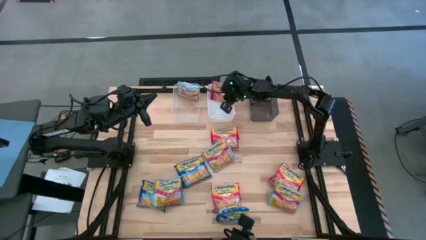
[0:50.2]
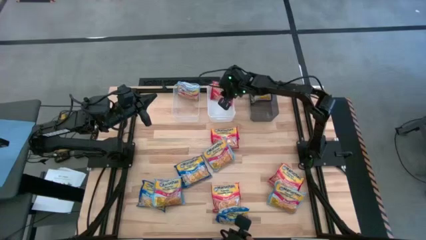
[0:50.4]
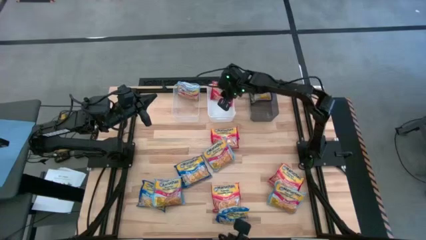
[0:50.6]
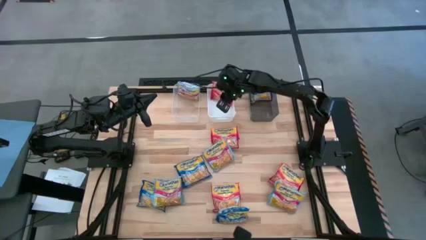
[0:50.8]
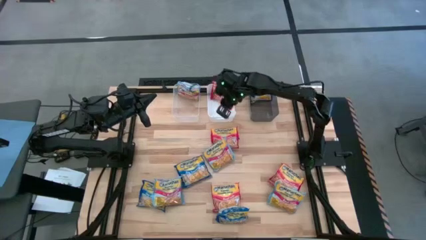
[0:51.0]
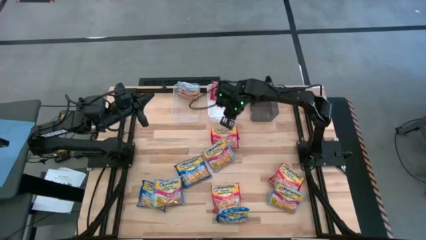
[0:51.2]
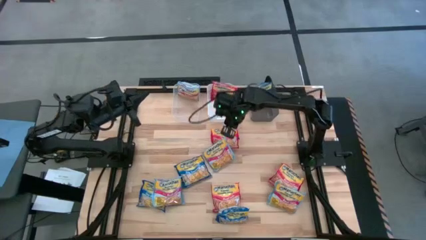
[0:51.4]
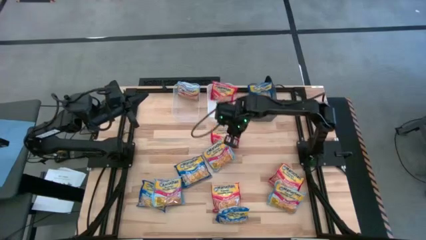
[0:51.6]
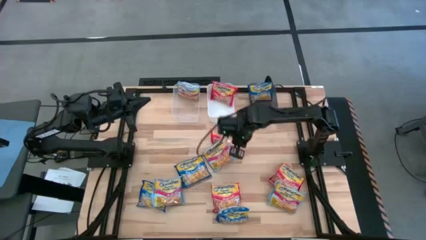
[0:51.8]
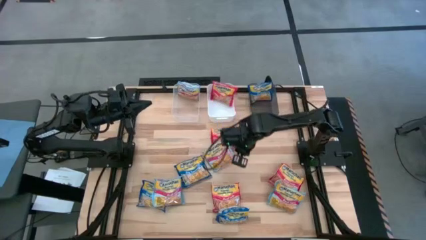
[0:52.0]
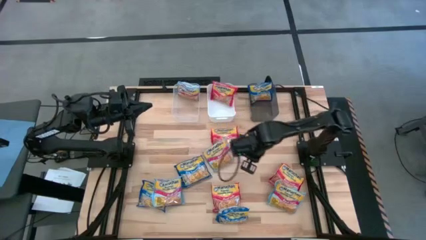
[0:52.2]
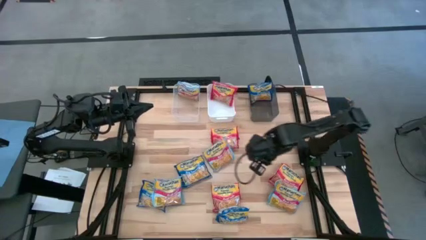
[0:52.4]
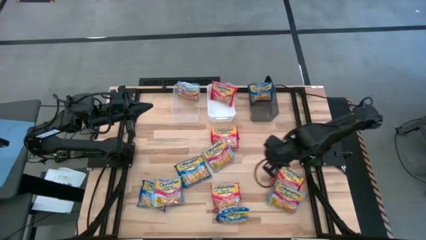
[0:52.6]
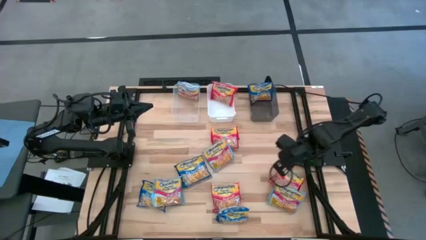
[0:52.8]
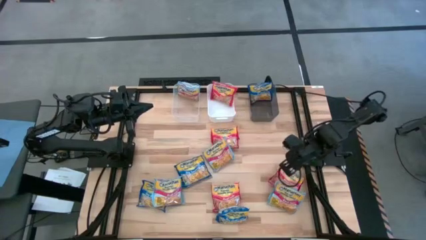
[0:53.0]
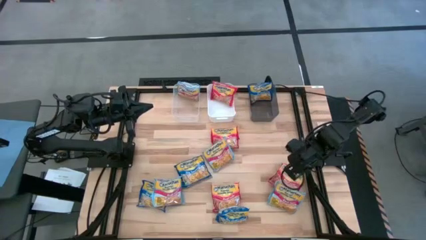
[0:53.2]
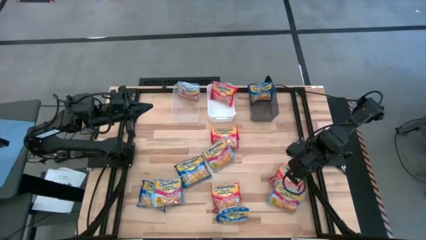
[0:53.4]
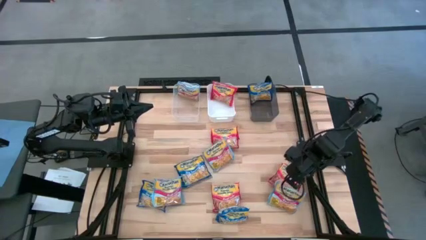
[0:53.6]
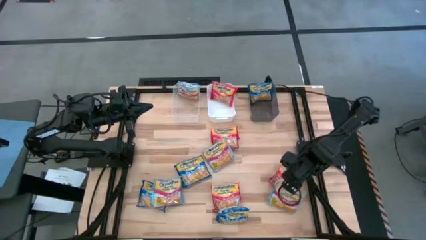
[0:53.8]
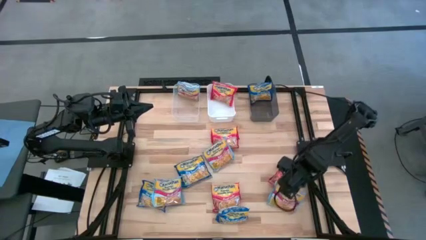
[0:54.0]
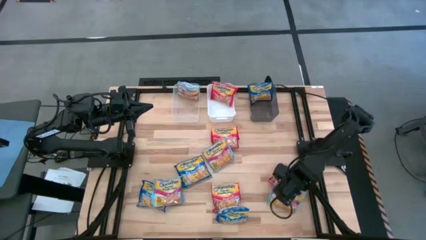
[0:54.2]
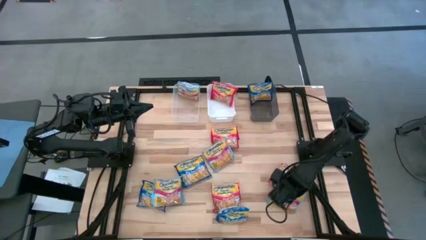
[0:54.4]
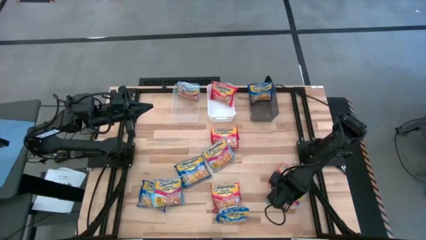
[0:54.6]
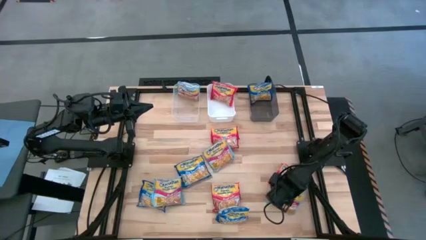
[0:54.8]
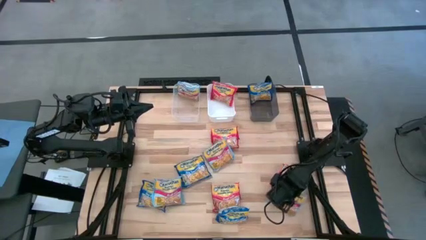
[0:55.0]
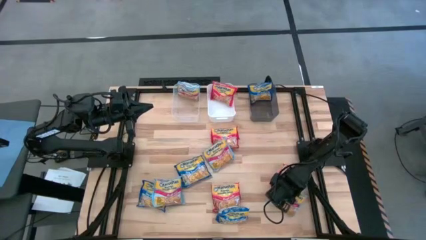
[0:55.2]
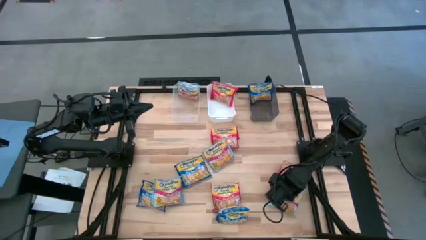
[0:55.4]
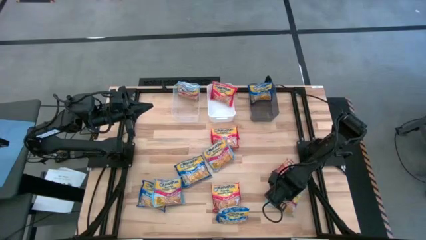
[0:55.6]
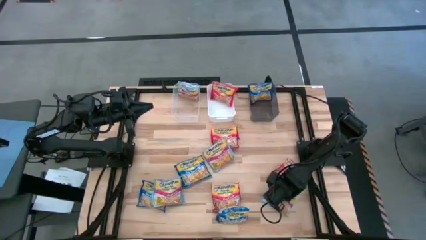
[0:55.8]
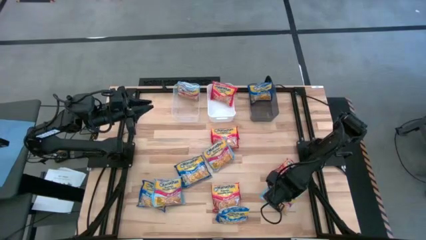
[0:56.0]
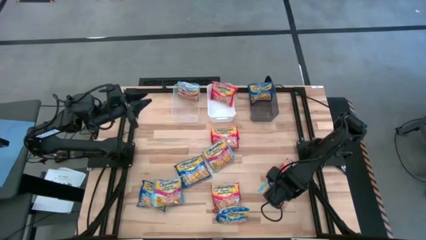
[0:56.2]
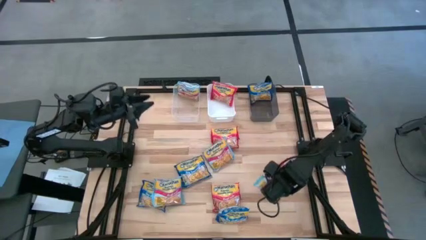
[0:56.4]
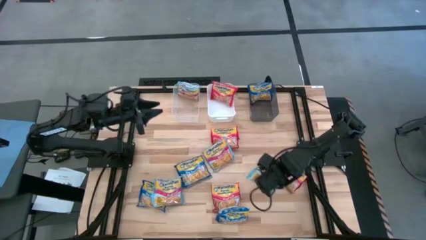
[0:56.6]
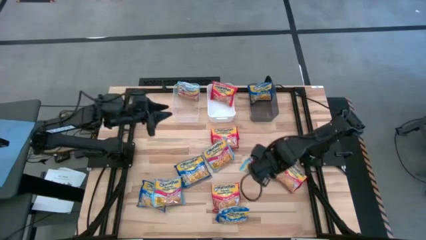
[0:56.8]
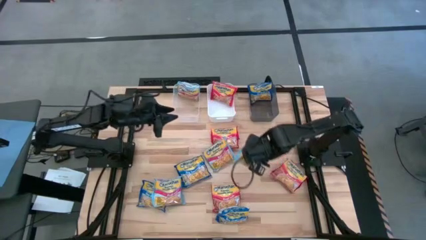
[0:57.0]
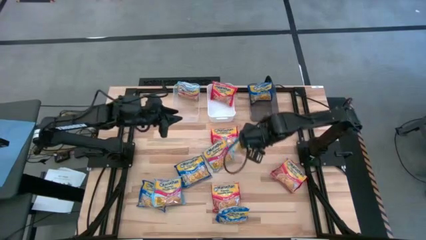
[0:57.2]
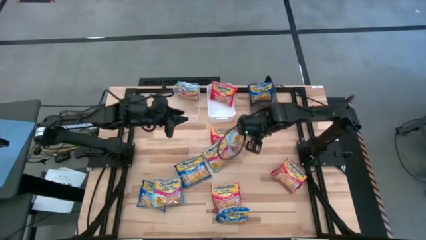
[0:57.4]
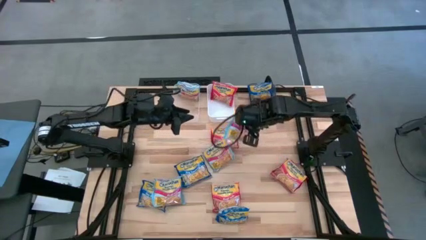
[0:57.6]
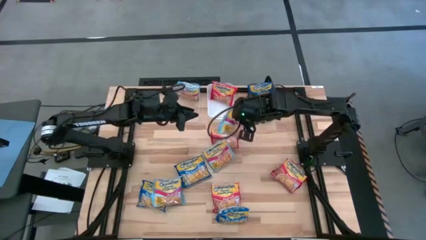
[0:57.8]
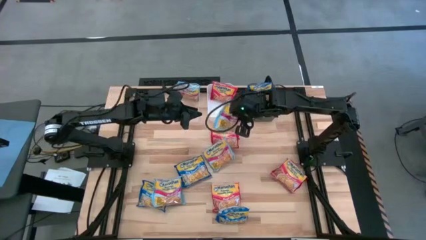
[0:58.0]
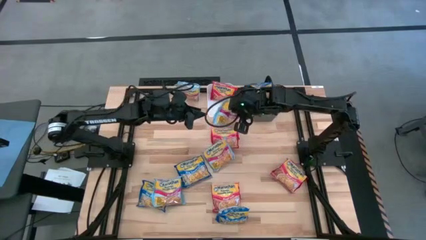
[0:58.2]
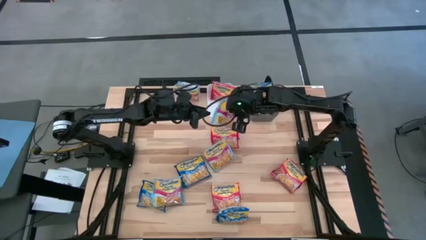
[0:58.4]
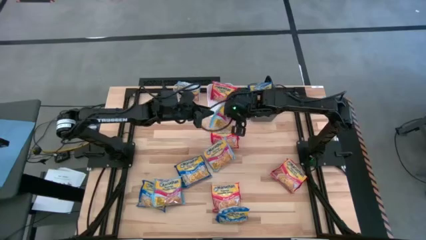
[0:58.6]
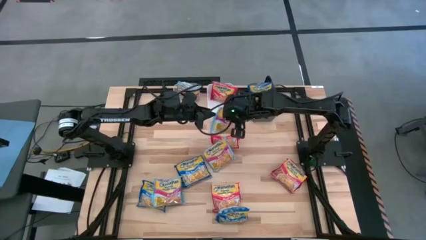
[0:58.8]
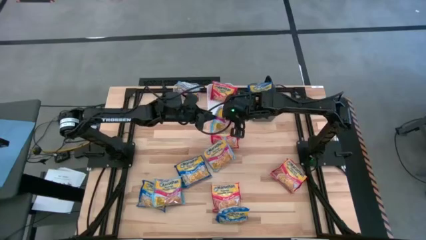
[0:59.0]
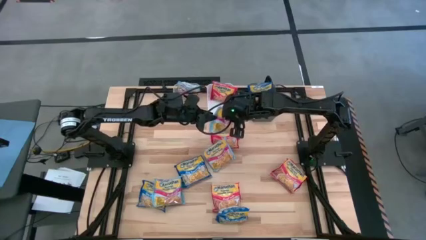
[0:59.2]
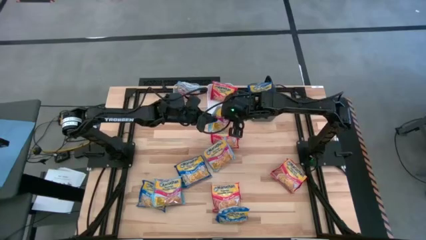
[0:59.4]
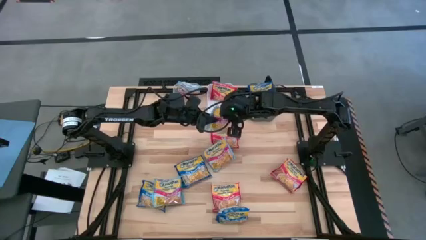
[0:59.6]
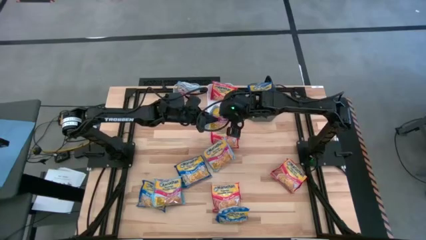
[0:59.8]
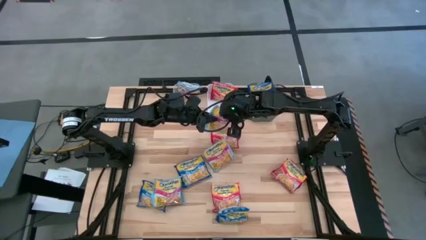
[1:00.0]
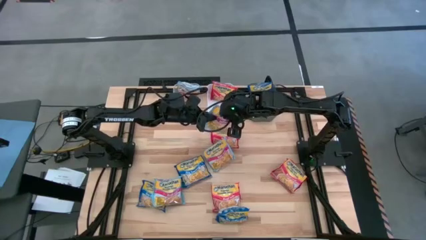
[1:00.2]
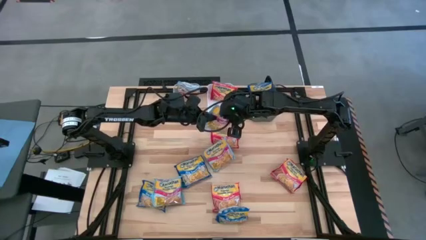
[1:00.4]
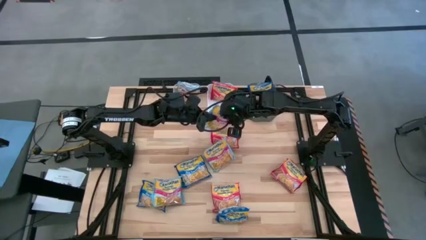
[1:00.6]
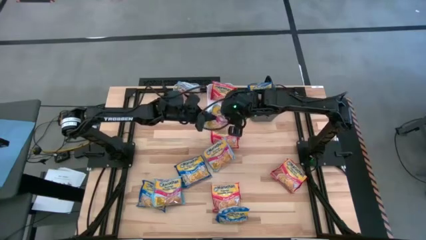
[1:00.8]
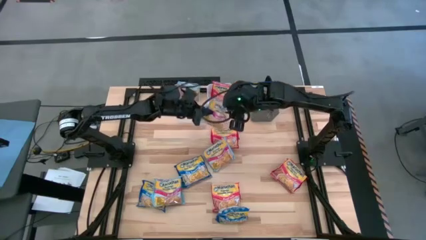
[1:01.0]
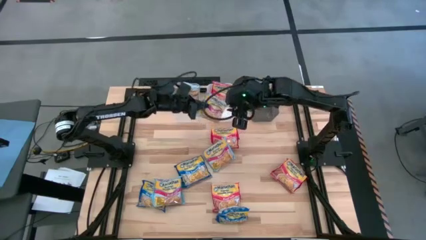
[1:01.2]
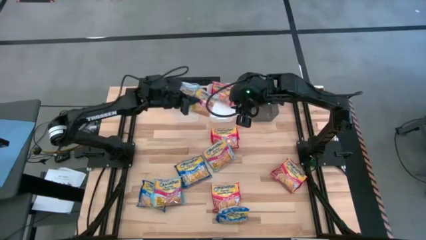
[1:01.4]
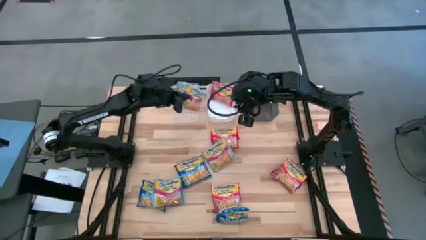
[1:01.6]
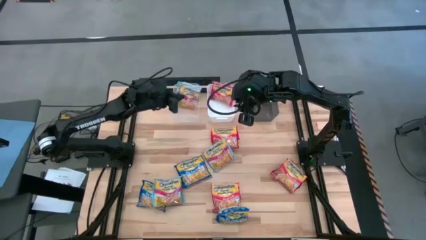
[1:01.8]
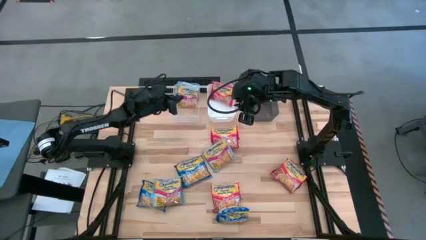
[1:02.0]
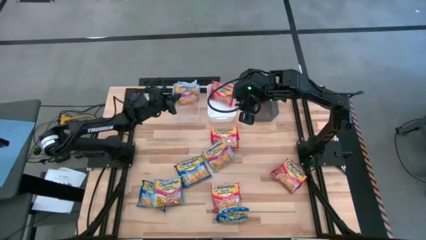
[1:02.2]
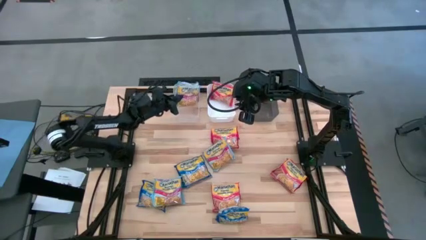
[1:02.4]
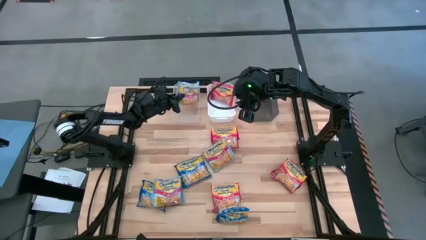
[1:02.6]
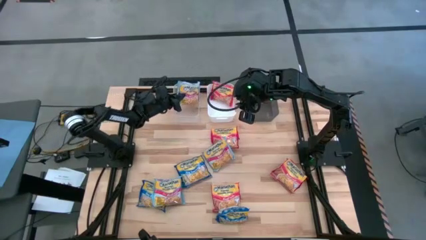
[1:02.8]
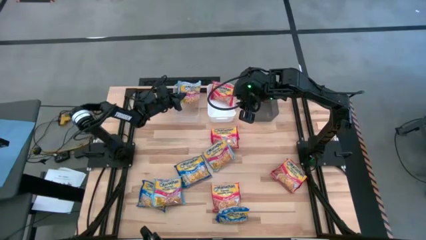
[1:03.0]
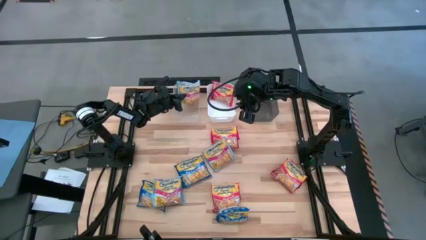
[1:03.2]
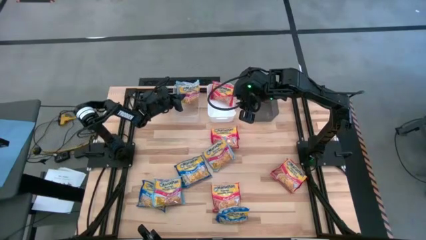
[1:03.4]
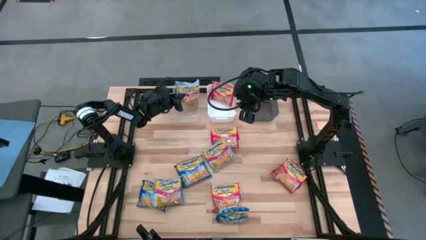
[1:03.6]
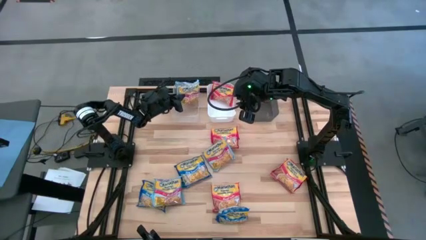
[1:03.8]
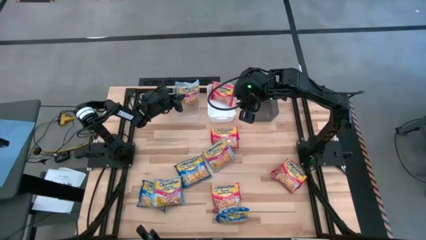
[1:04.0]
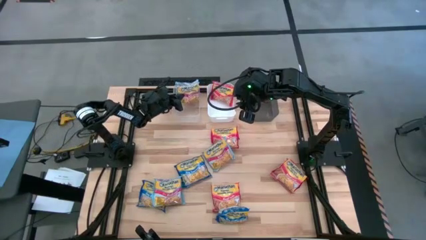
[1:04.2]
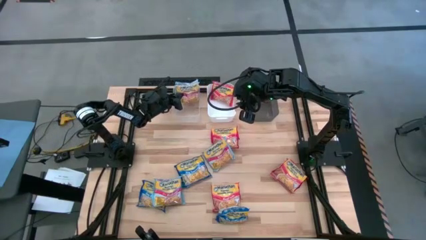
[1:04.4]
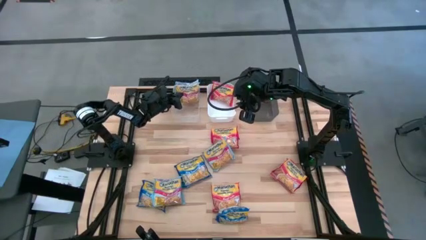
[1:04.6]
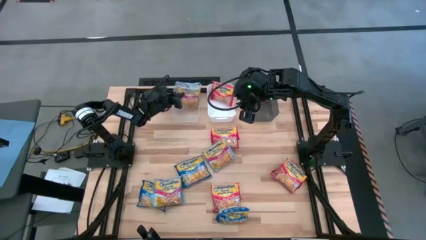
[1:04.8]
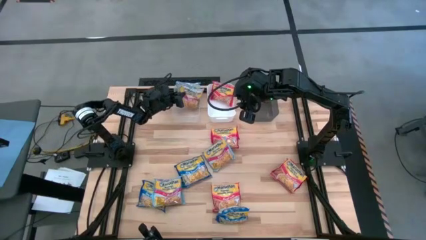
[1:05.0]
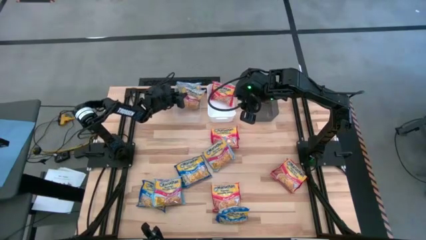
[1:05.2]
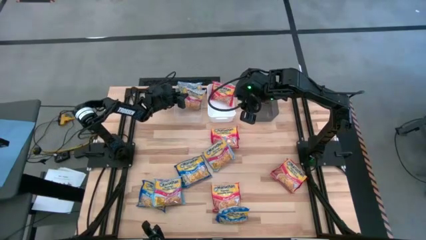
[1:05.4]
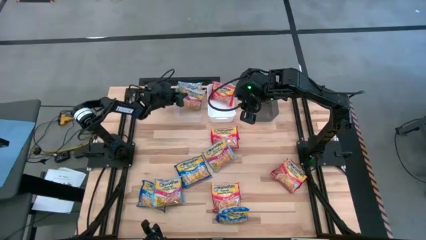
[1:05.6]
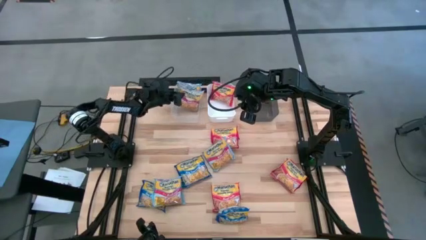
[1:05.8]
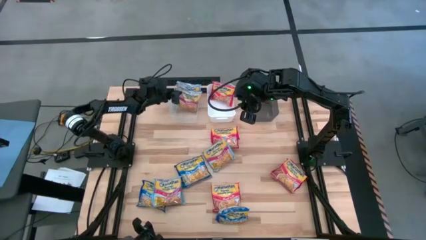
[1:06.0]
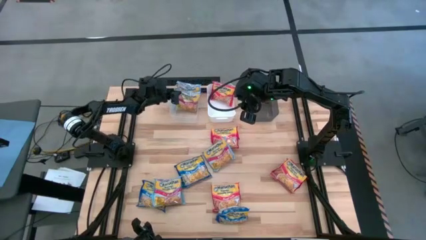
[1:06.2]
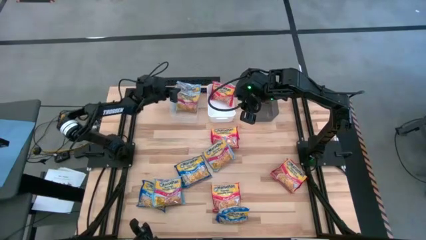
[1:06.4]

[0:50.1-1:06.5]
Task: Sort Maruchan noodles
Put the light blue bag into the transparent bin
